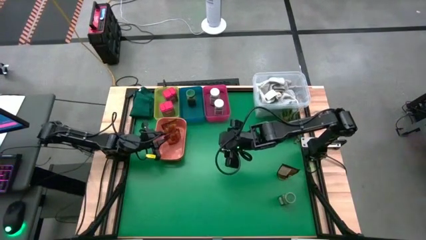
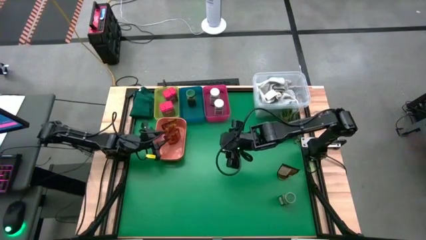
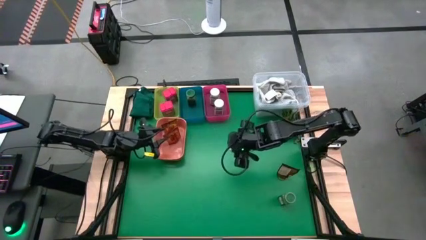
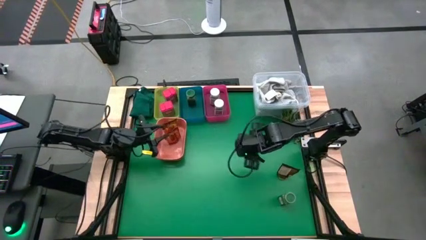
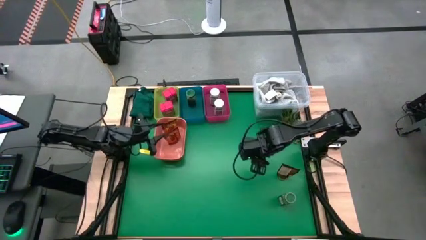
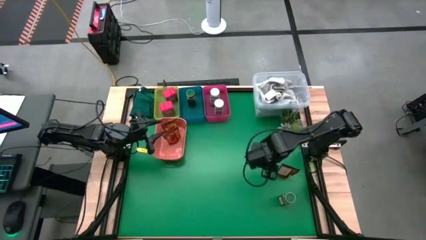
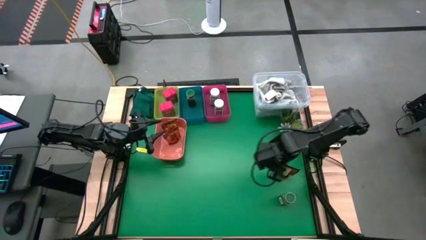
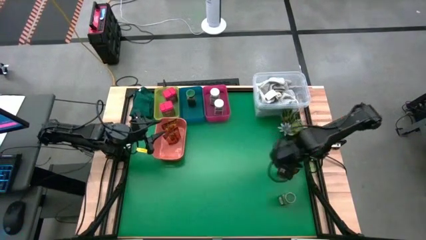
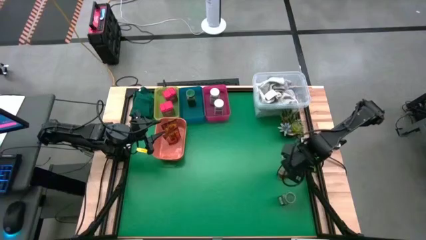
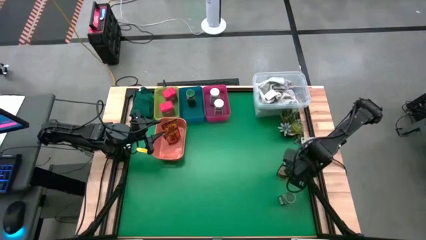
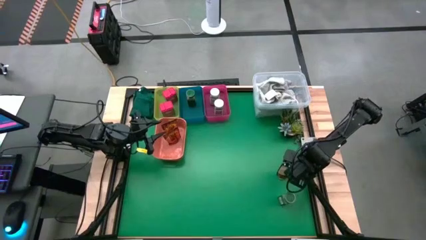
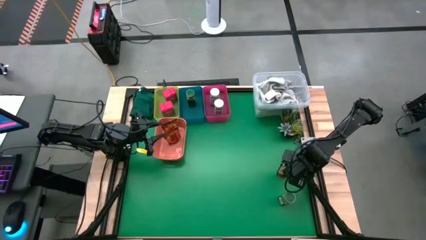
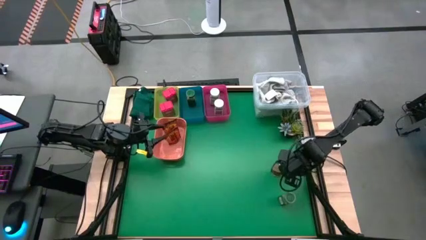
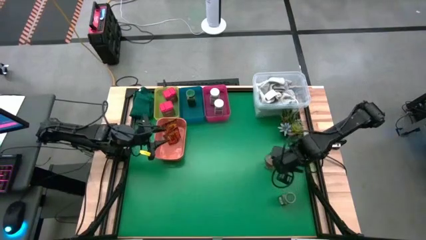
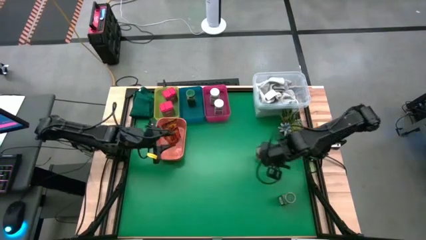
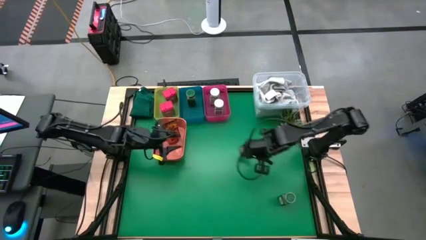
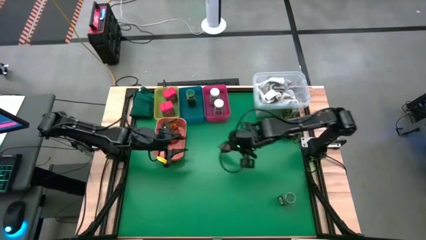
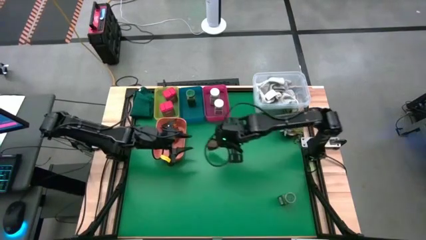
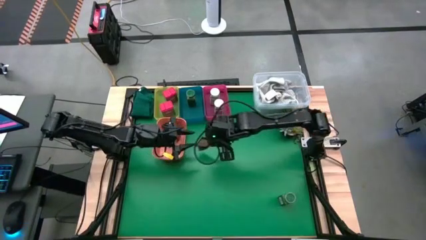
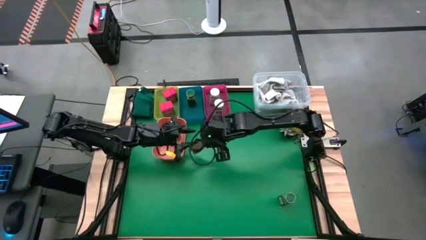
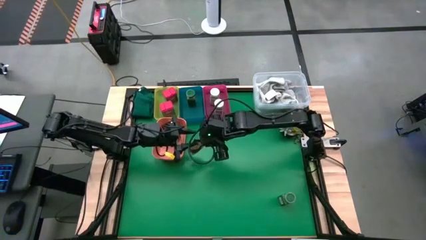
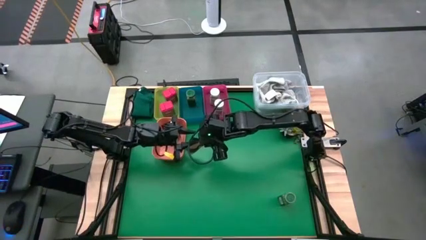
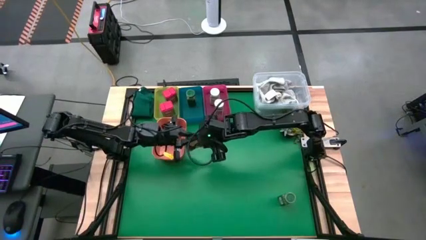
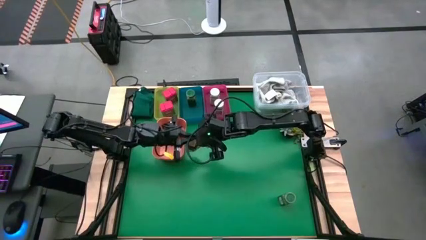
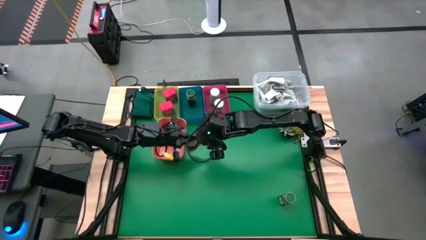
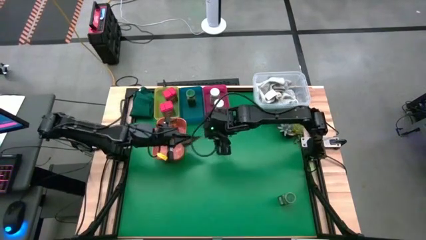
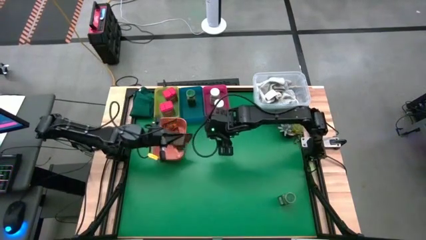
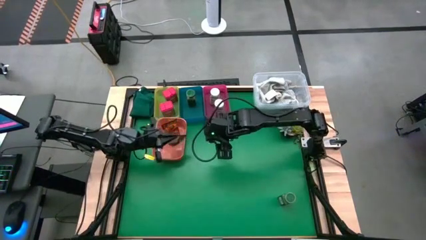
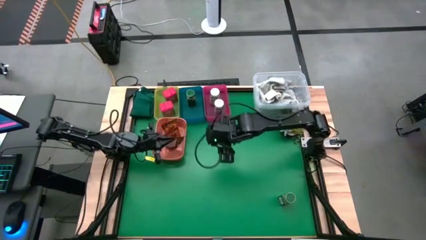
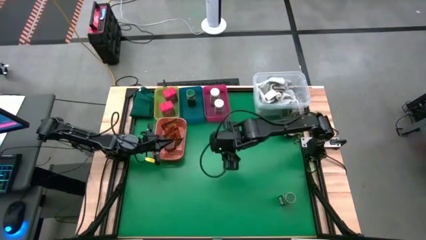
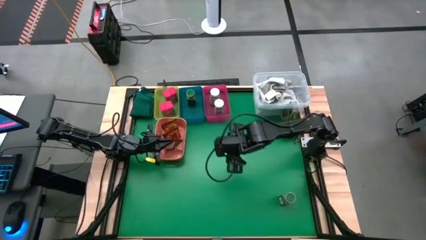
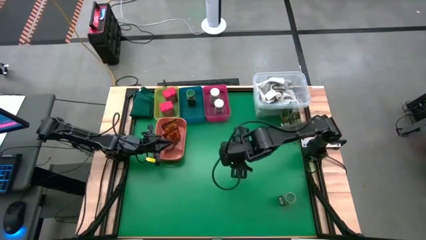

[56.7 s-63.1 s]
Task: Sort spices by type
Put the brown seasoning bag into the orange bin

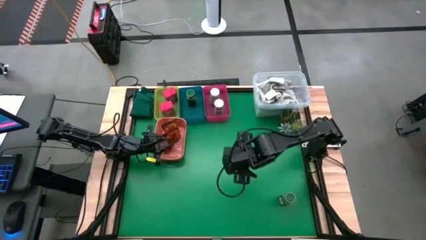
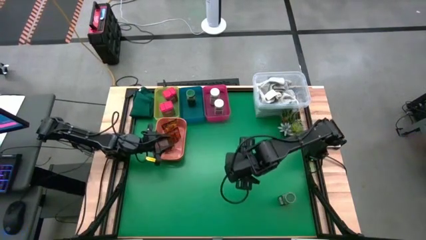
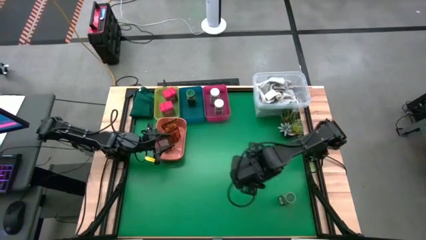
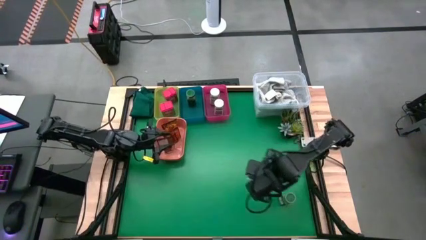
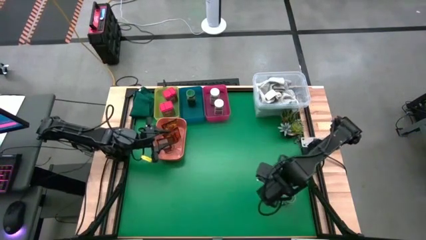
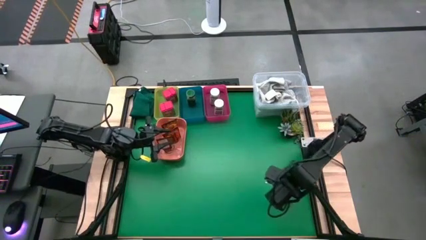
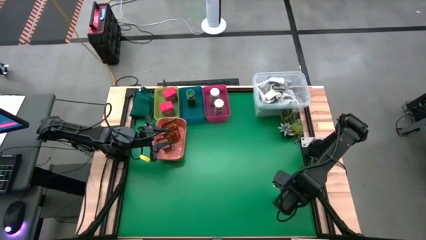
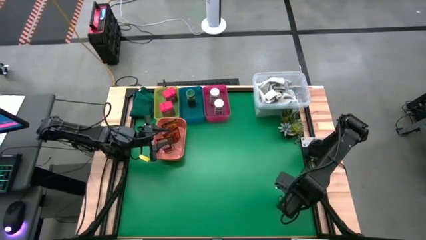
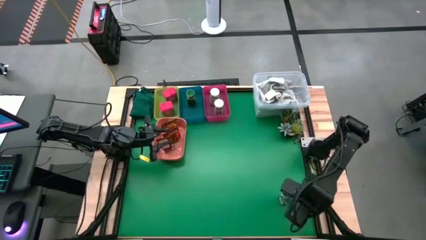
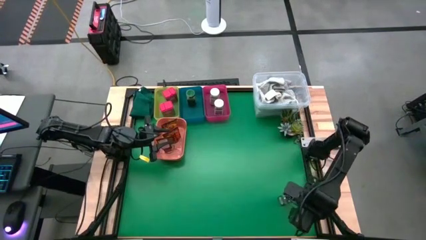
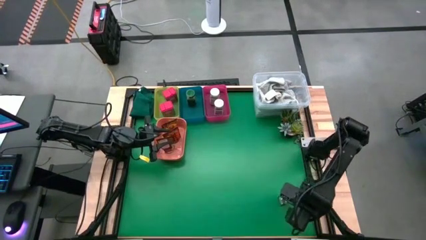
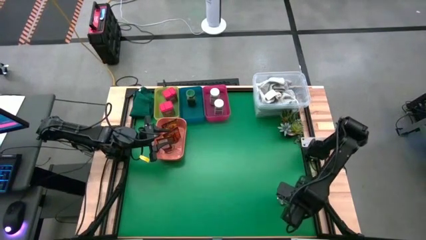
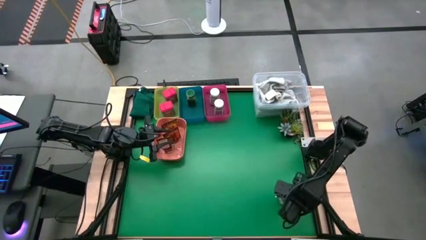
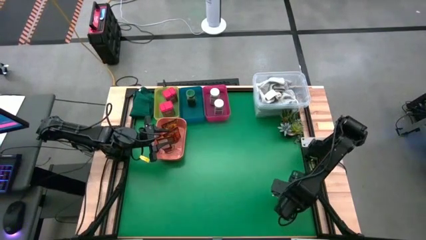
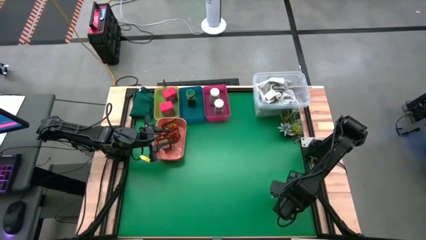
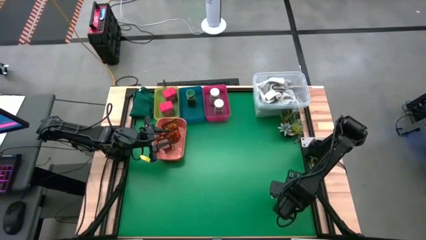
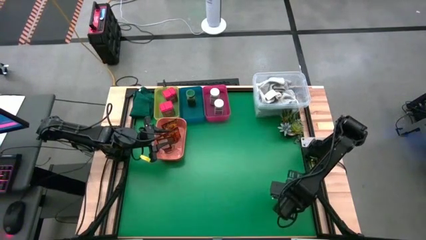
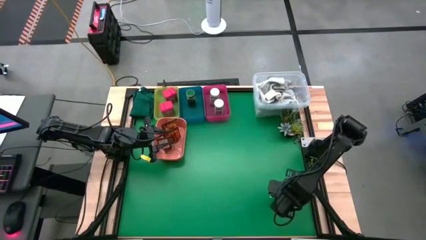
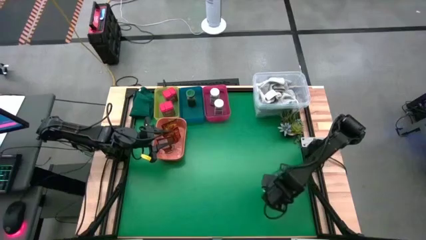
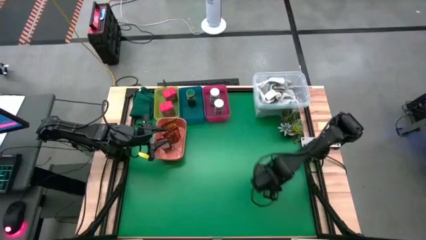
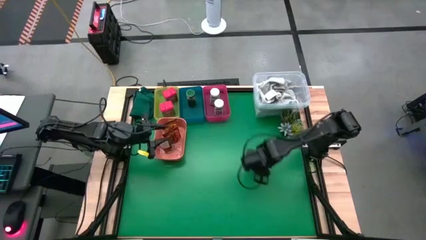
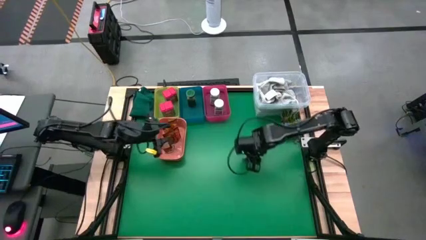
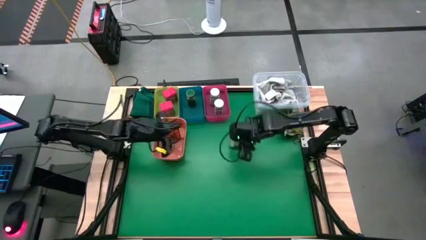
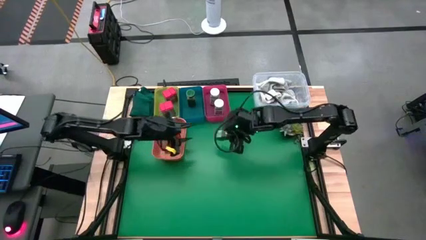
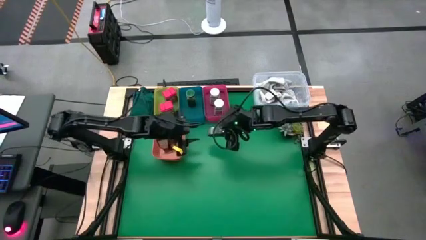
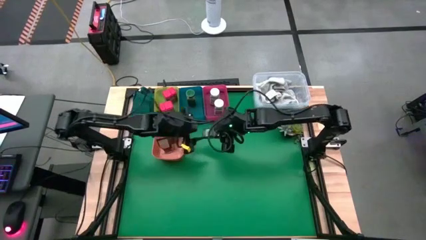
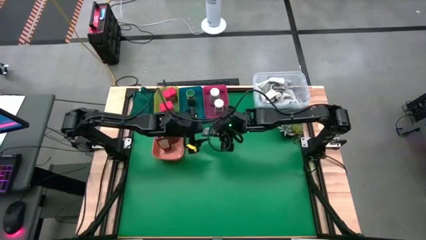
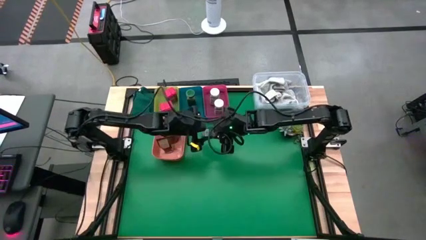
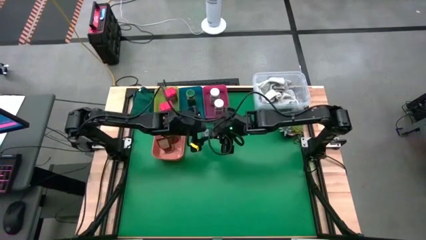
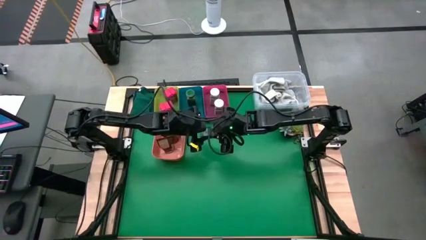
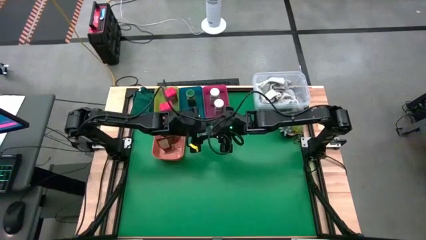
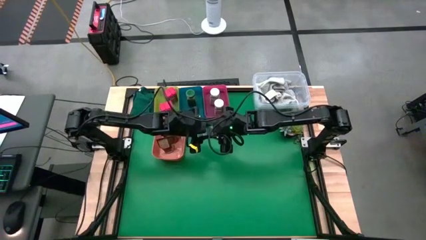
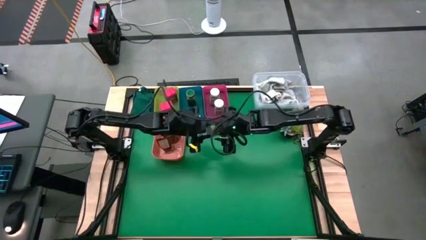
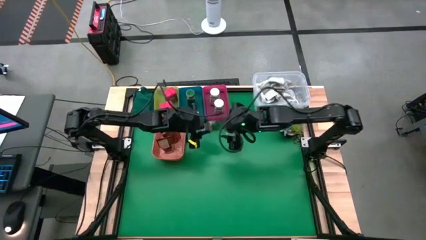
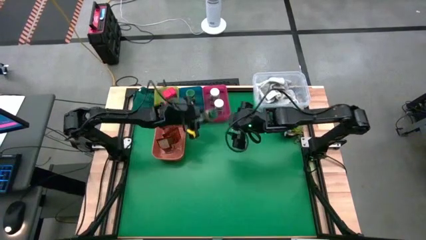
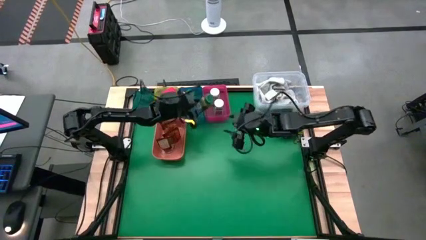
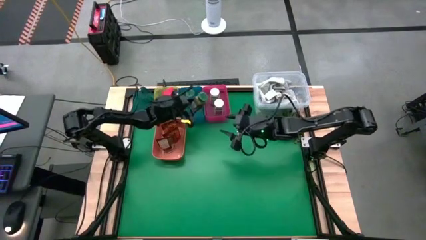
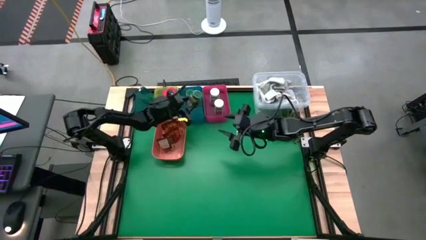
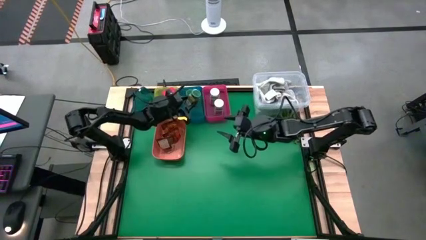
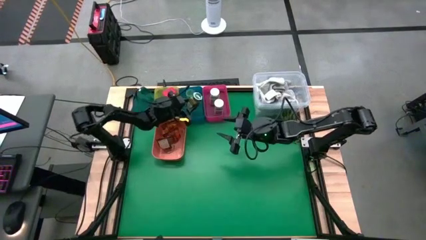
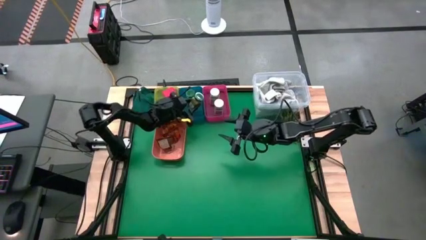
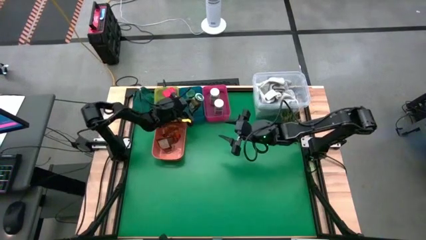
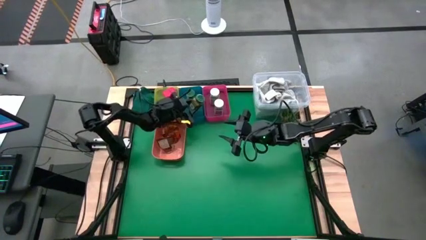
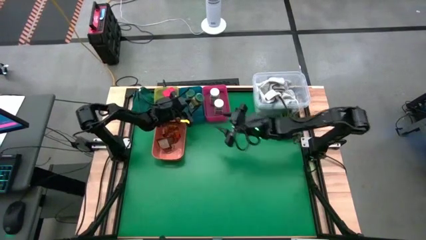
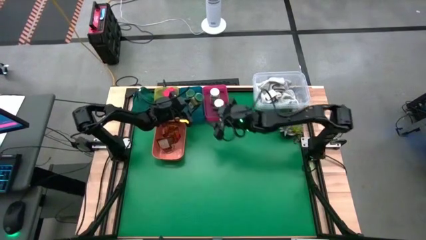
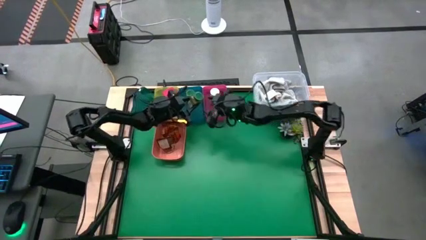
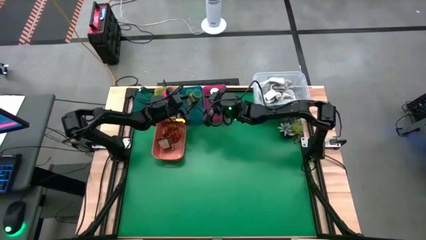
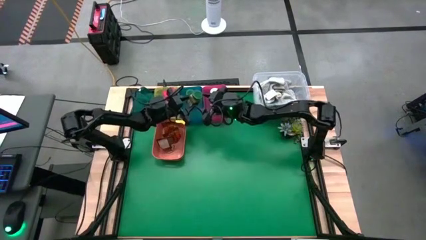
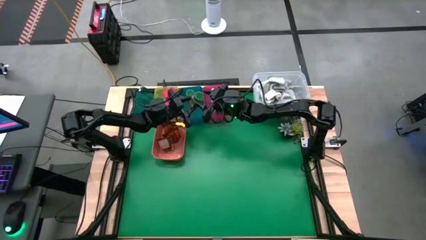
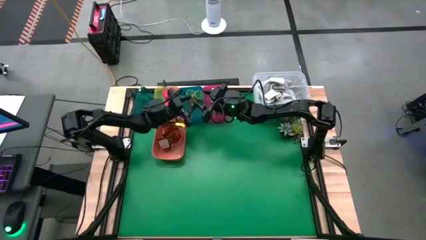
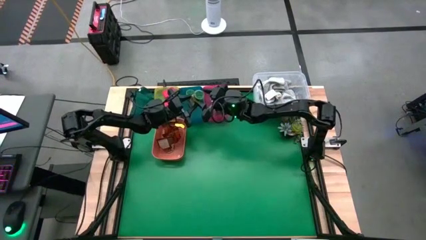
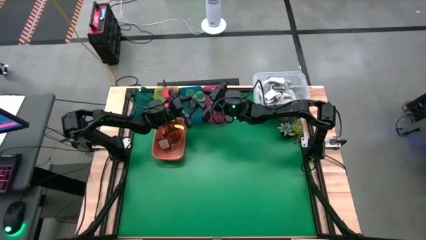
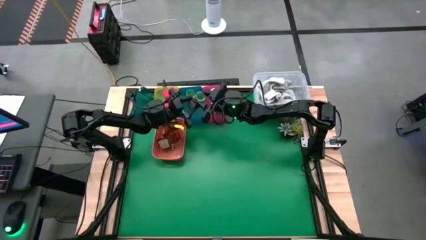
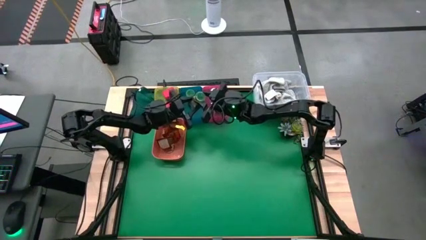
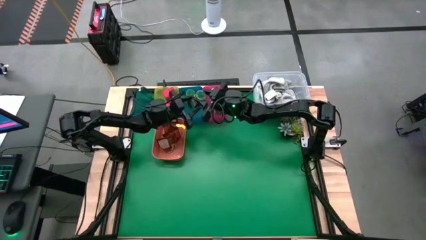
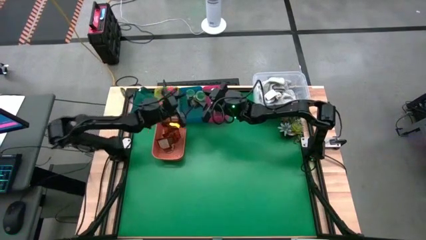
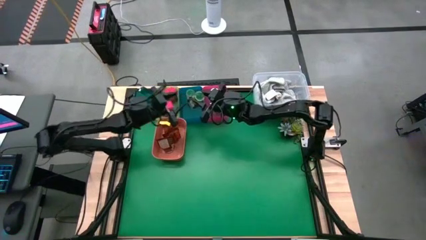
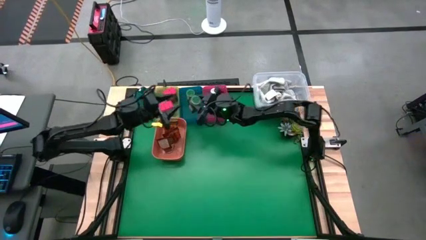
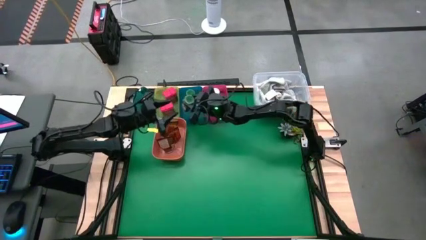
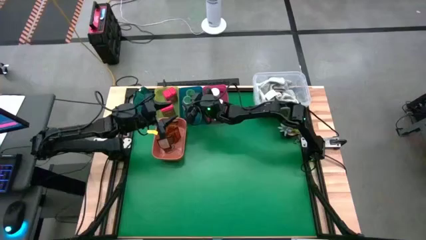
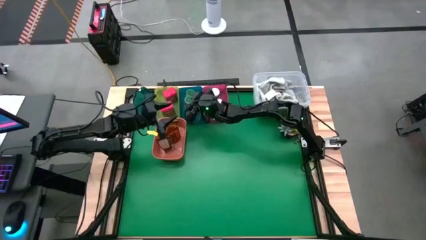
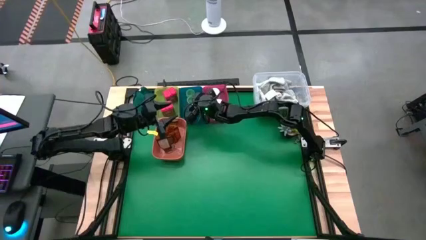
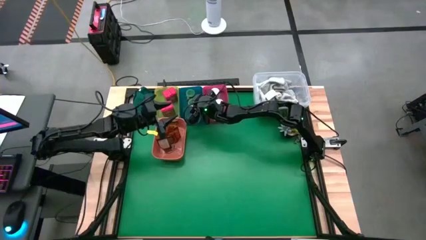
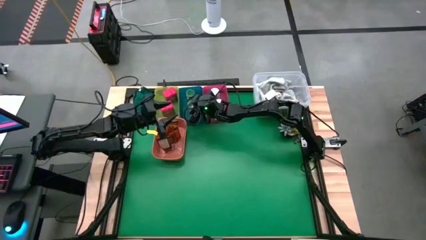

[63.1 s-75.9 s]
Put the green seasoning bottle into the blue bin
